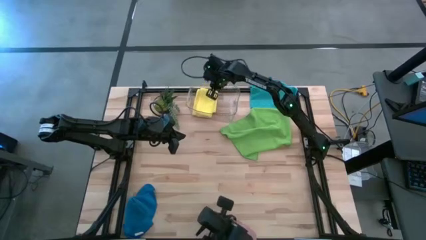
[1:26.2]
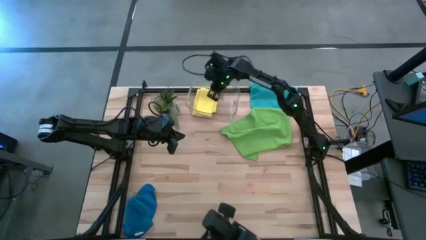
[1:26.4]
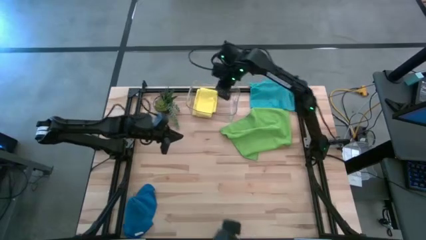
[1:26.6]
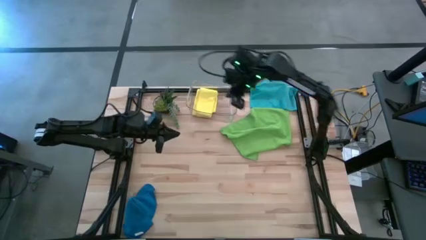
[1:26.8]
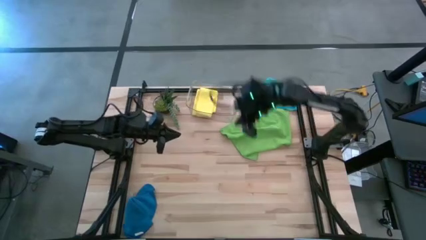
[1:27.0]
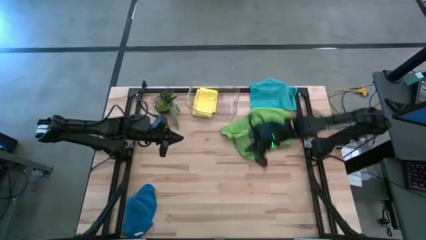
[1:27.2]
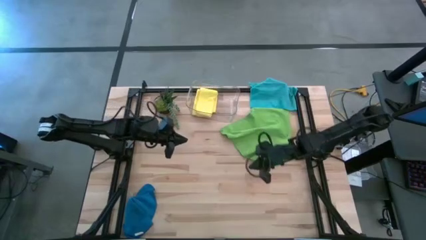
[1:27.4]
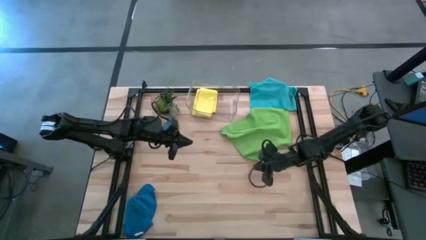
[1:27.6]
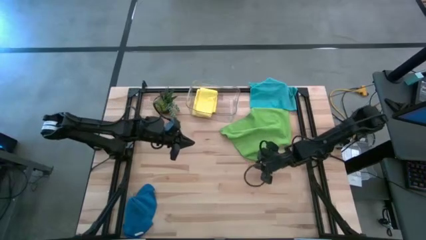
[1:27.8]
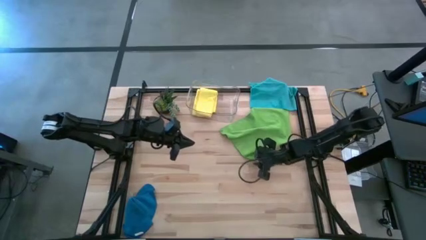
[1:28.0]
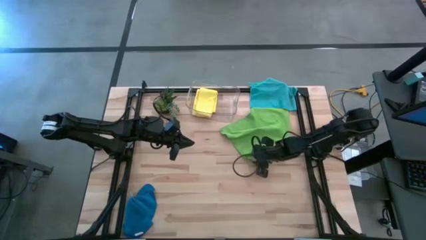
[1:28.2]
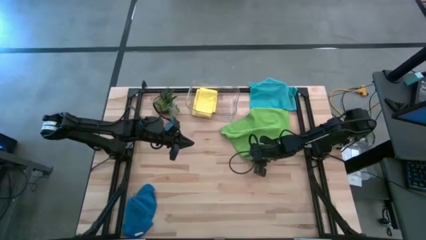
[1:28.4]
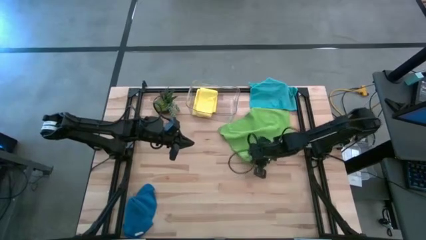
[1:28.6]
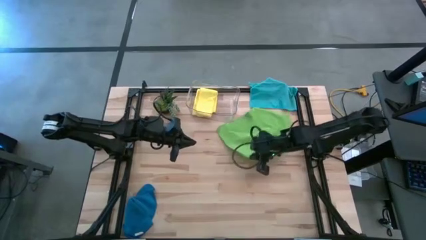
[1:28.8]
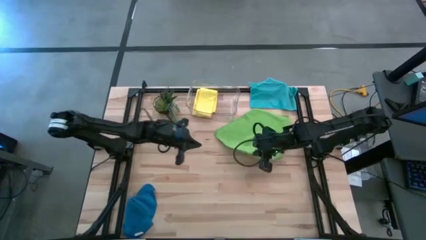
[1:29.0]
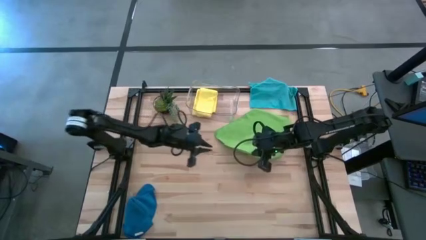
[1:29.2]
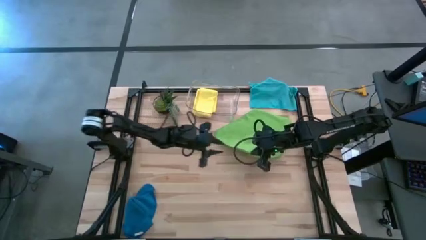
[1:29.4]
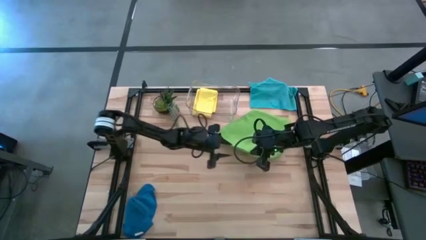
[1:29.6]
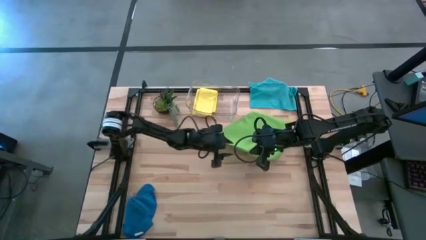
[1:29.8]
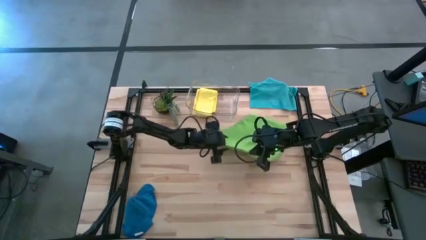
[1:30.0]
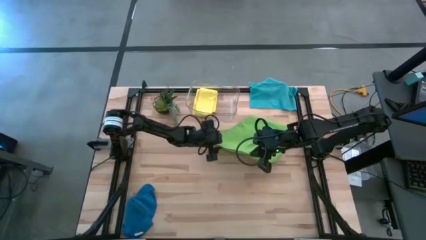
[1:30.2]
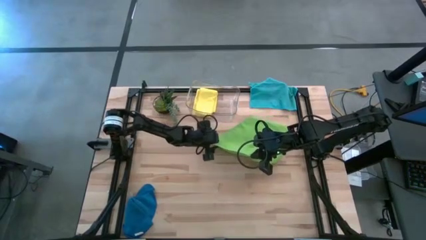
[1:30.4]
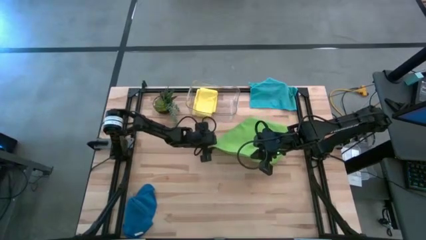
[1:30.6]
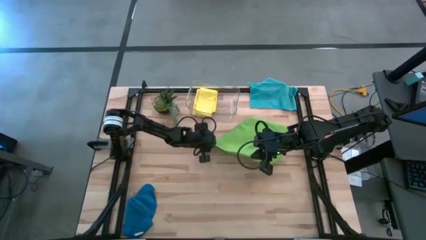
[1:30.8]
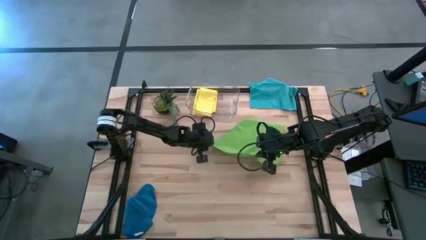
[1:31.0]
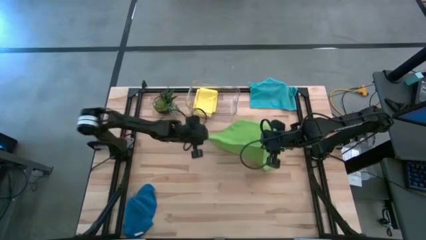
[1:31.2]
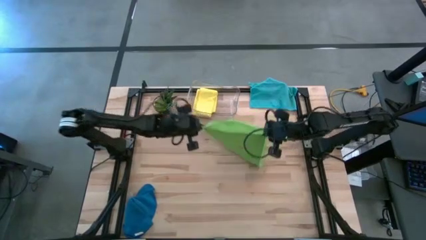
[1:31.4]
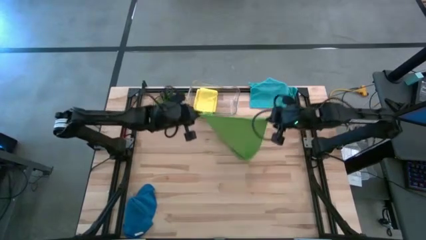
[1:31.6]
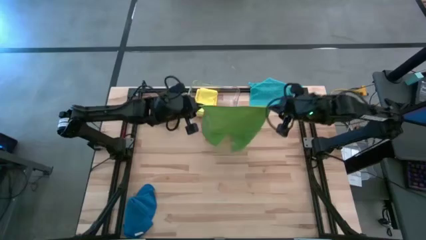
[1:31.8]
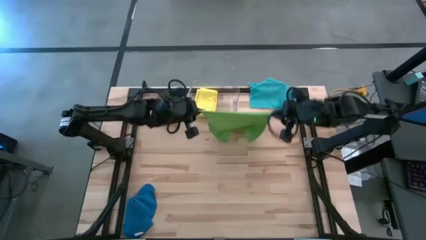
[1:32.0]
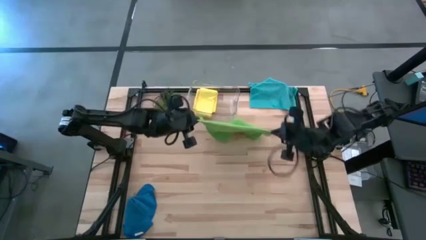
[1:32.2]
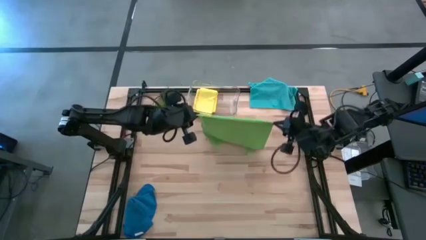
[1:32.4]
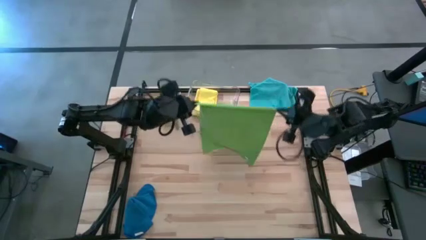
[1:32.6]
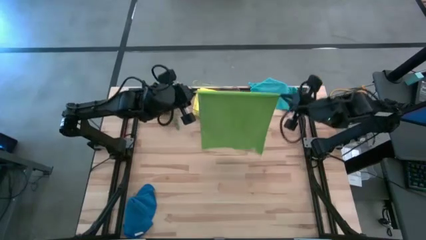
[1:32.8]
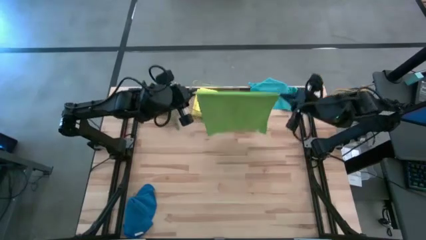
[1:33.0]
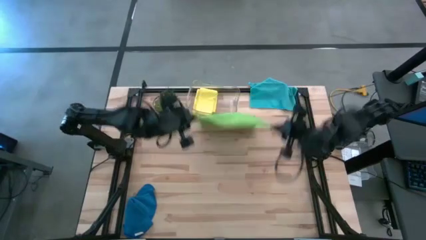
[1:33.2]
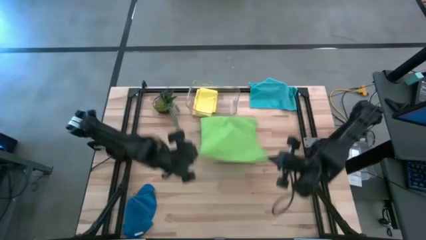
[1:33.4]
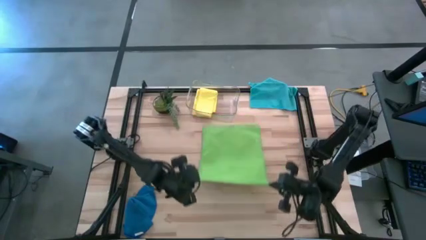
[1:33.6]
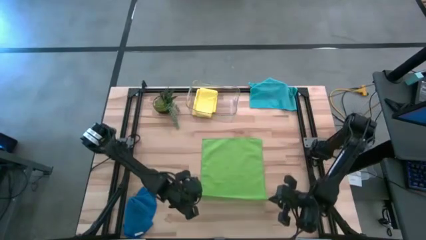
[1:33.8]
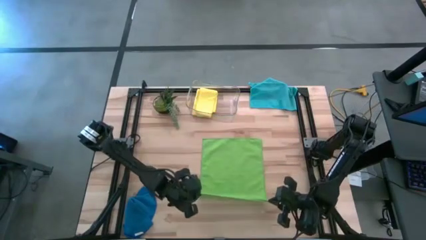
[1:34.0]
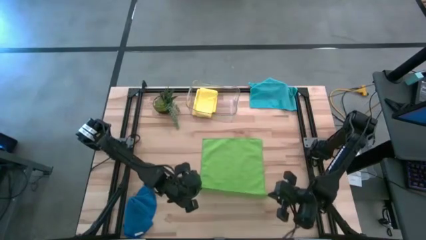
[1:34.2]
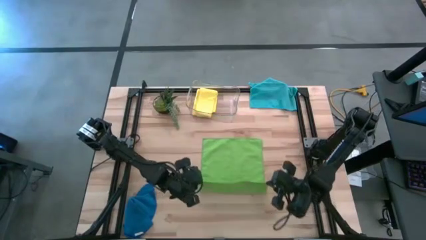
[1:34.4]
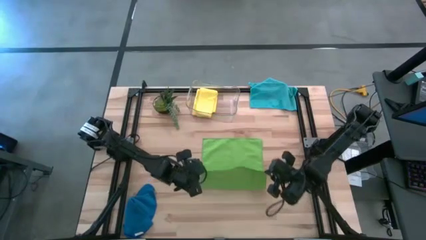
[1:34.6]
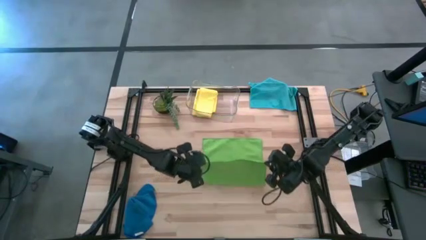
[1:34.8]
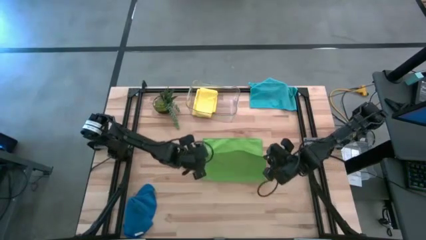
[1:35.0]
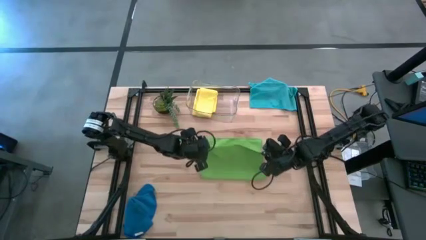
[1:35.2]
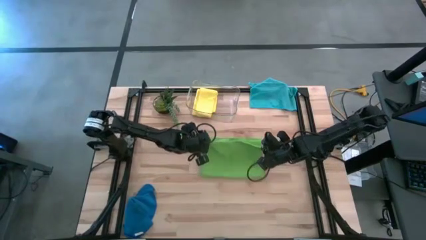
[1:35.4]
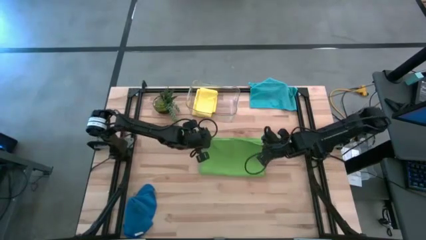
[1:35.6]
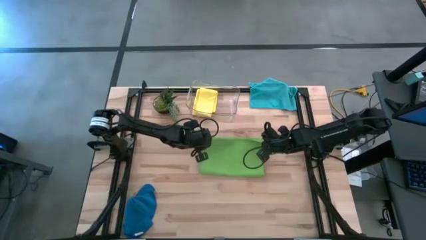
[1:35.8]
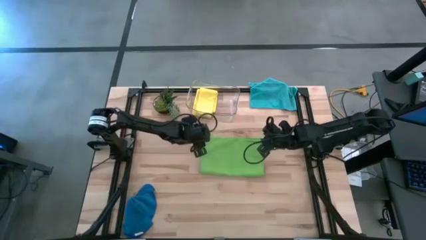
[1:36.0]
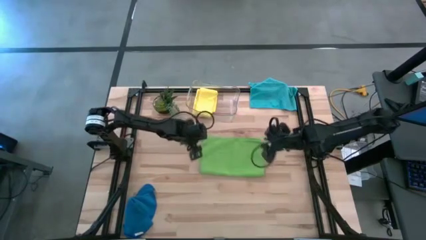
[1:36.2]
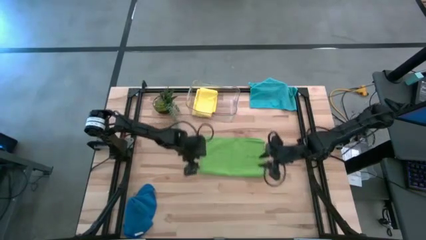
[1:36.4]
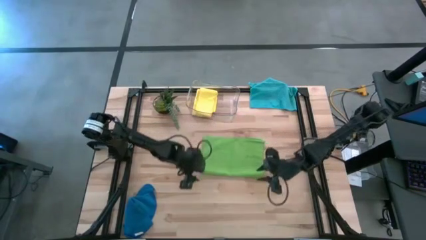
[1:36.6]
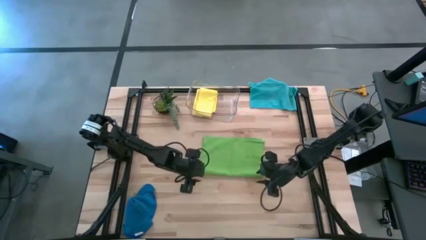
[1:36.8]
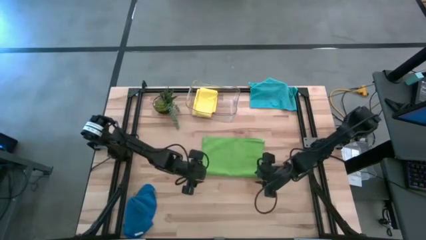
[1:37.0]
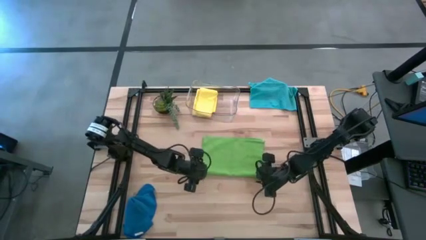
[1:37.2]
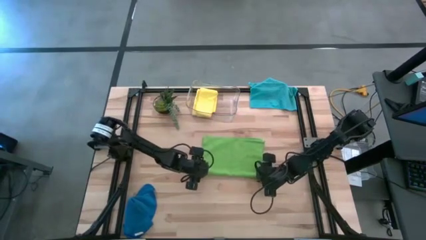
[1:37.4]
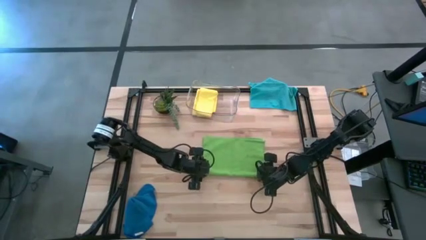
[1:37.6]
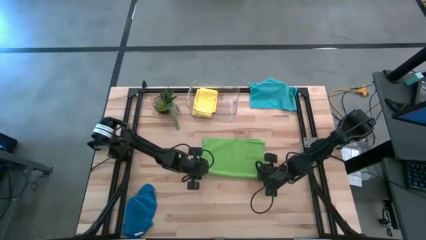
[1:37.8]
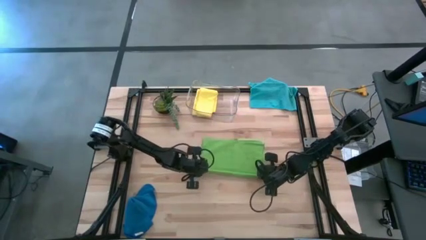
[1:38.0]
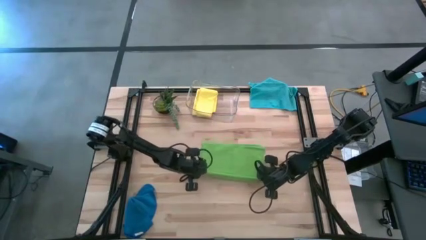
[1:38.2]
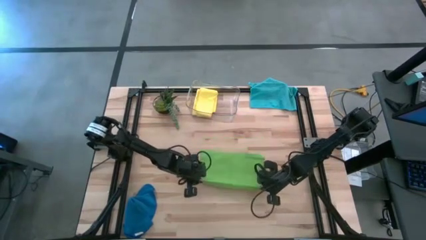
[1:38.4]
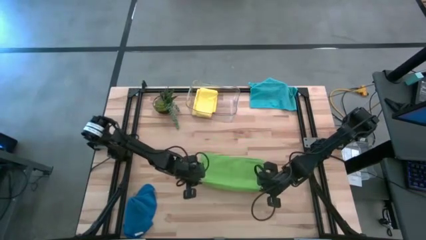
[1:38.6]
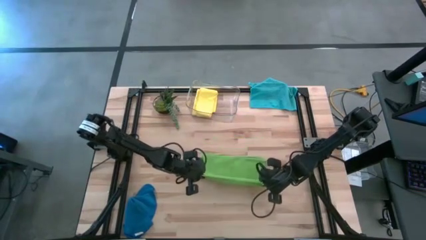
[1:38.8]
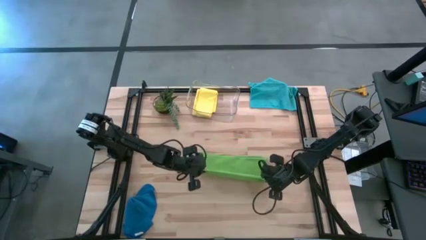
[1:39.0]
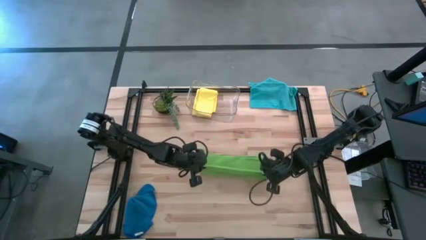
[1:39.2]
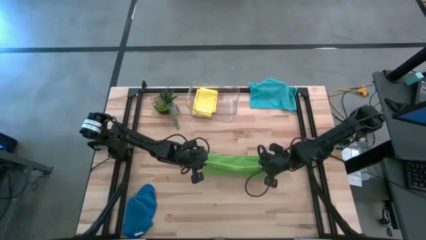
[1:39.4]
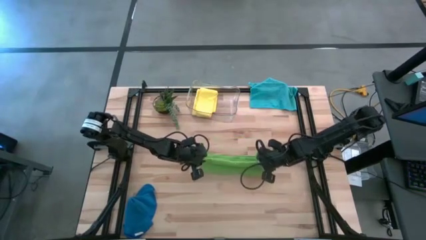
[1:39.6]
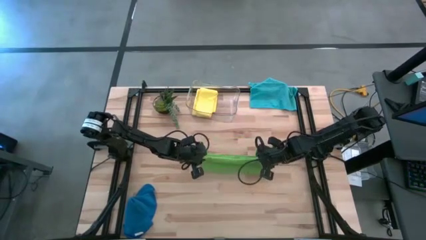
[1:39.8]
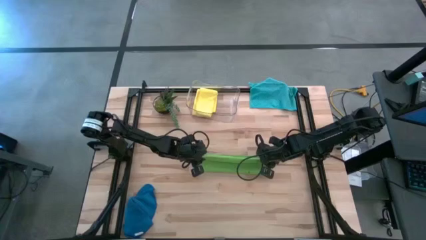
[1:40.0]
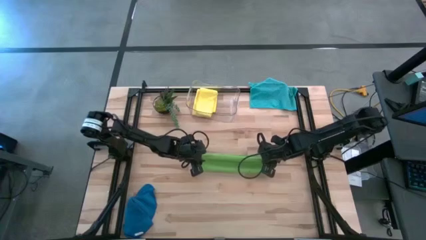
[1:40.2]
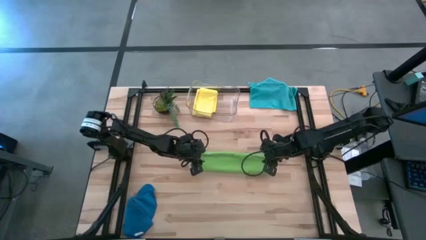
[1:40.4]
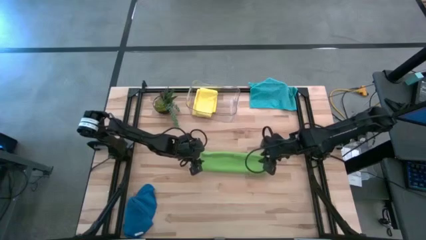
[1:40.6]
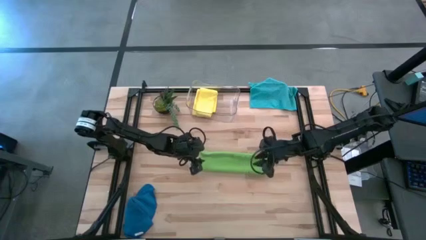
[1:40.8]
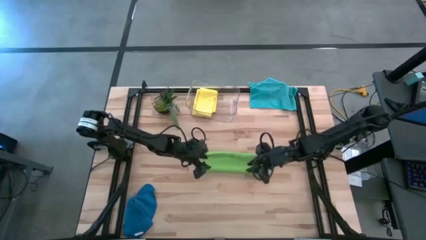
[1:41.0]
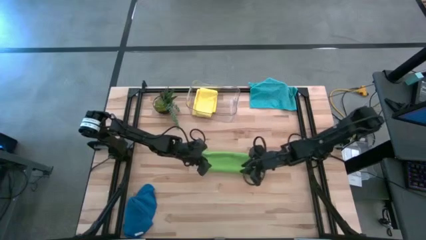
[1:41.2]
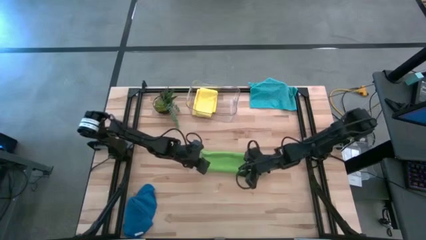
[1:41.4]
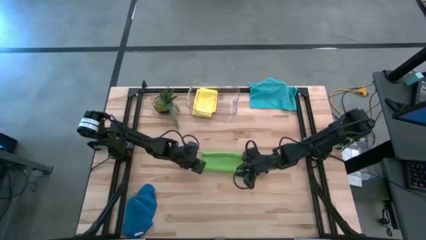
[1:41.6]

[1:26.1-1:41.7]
Task: Fold microfiber towels
Fold the green towel
